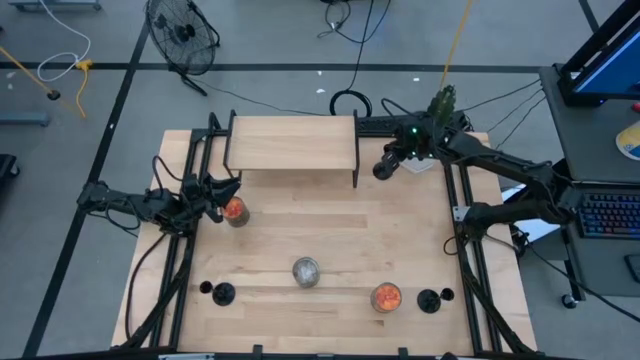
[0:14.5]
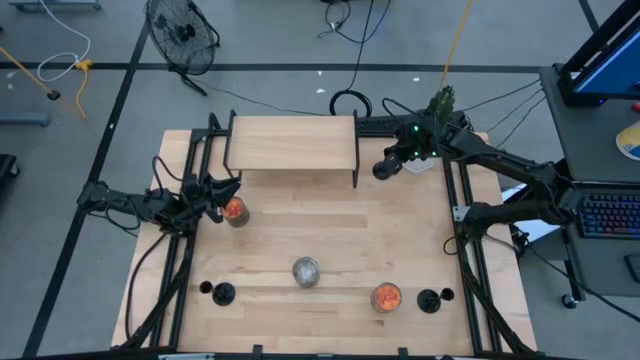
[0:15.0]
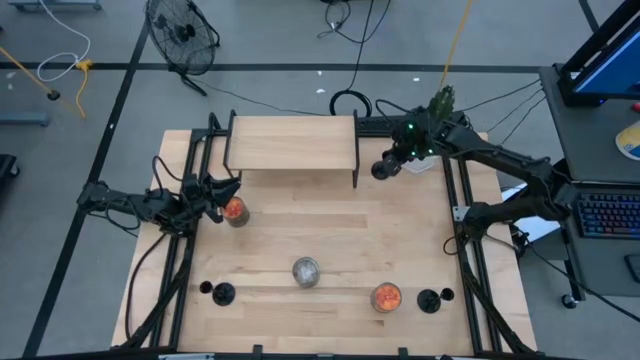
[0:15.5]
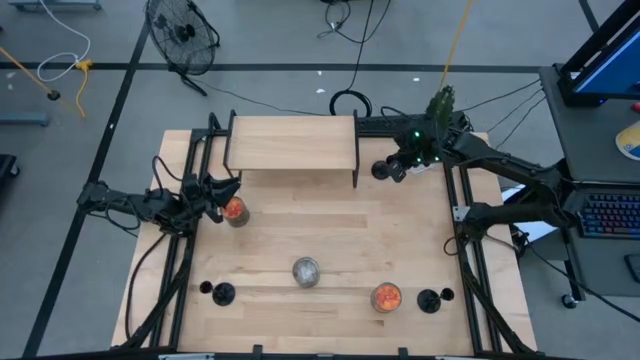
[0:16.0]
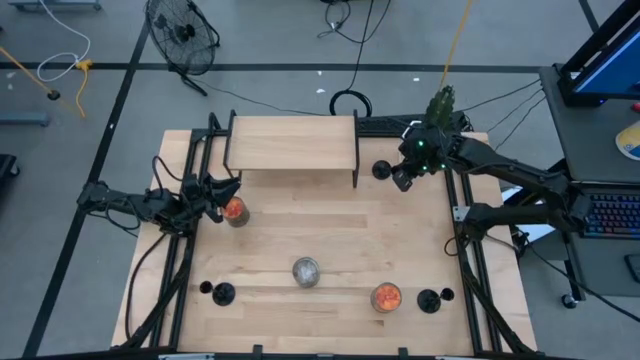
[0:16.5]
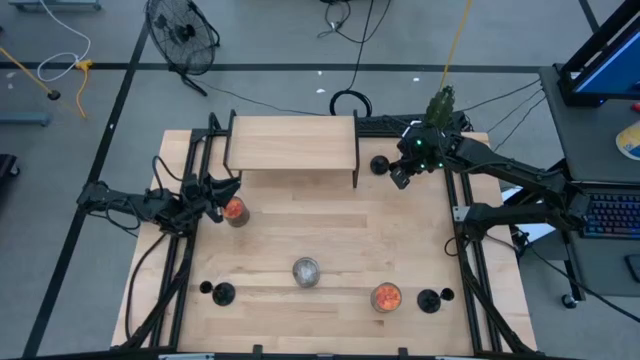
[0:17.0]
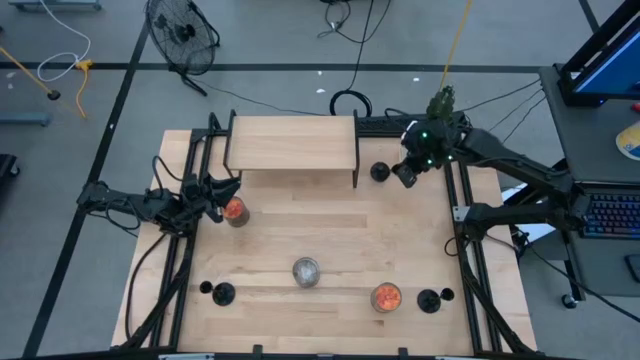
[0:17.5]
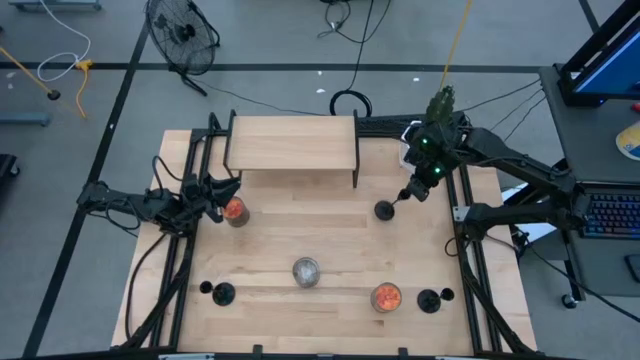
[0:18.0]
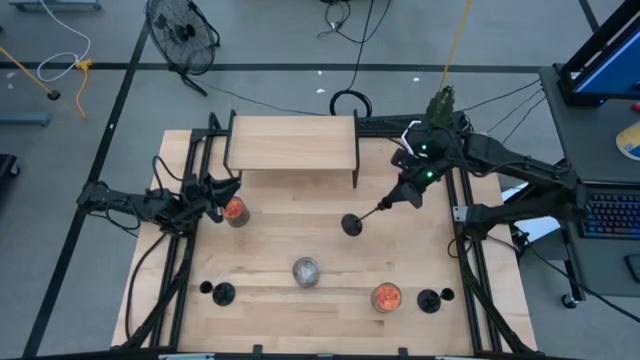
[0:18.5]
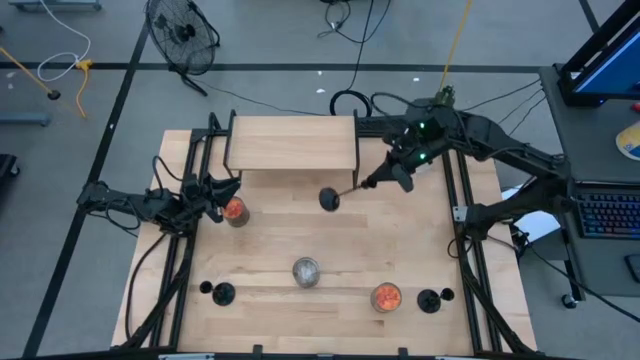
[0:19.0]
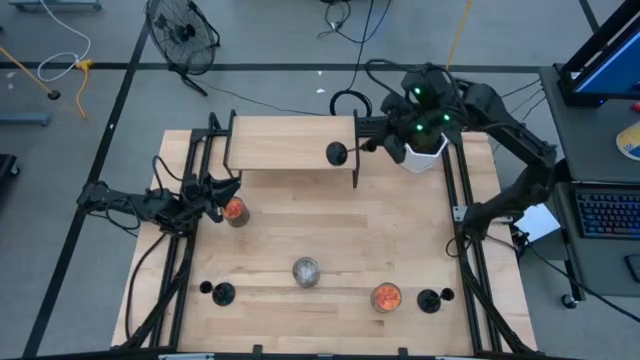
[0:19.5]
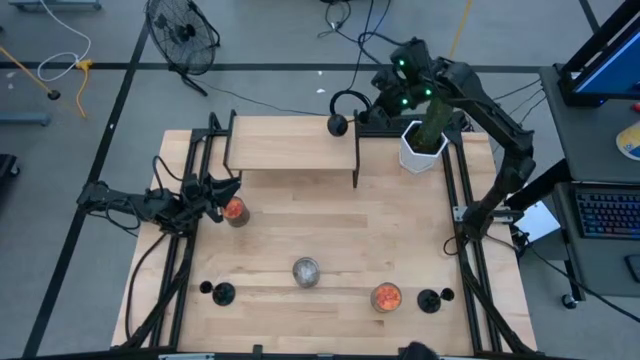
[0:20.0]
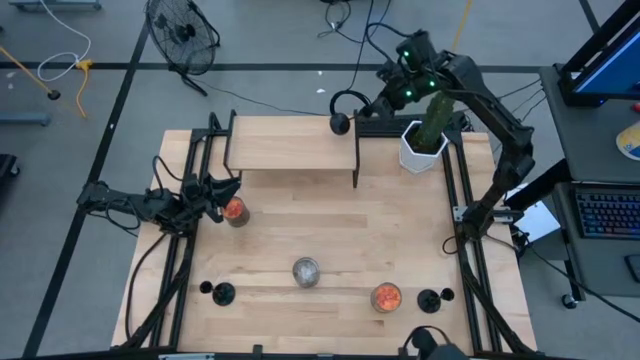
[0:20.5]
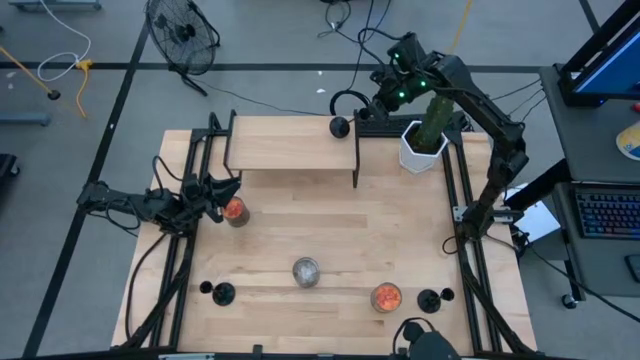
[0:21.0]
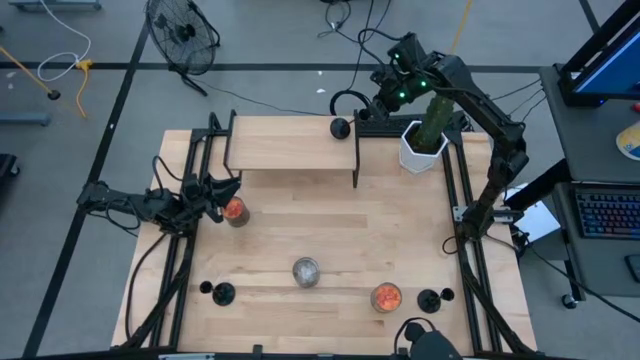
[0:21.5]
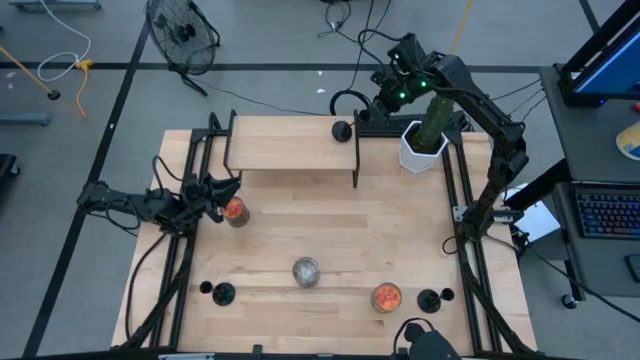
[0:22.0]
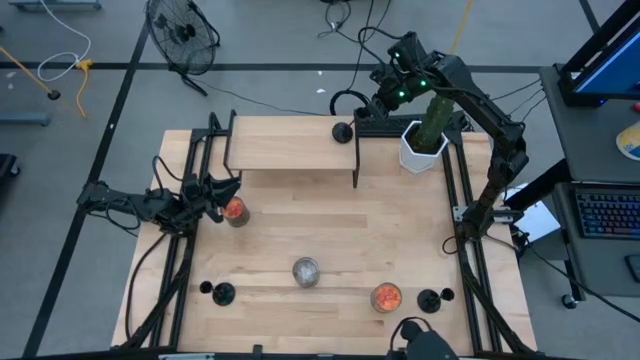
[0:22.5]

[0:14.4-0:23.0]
Task: Pick & Place candle stick holders
Put the top right black candle holder on the shelf

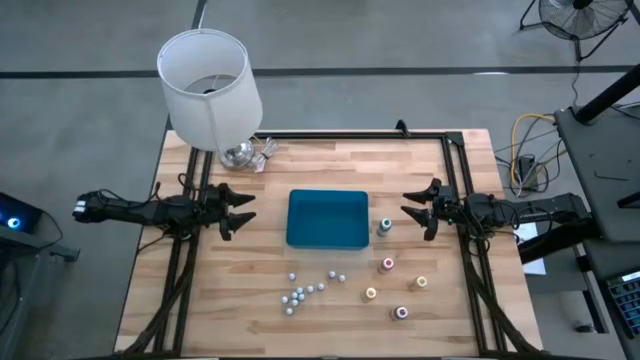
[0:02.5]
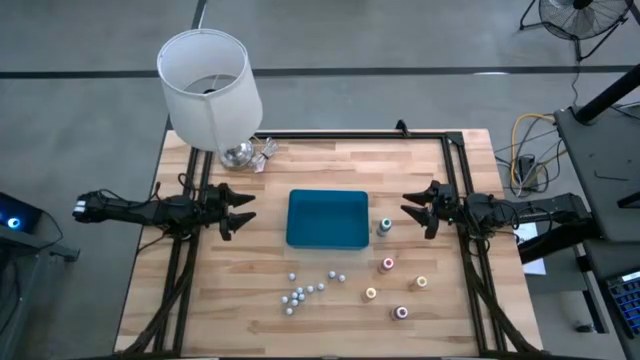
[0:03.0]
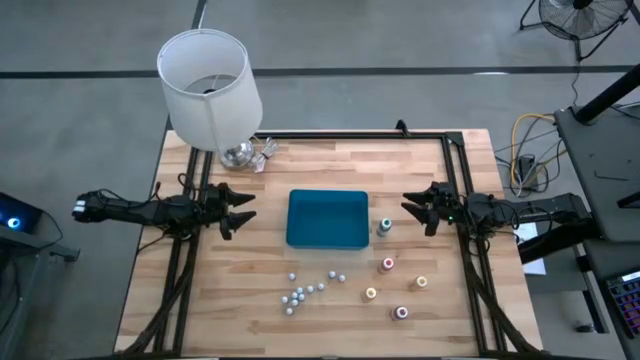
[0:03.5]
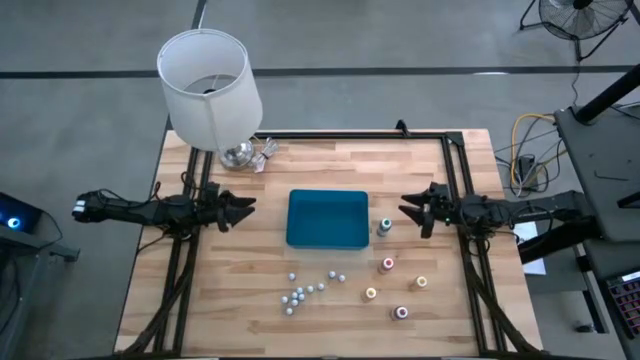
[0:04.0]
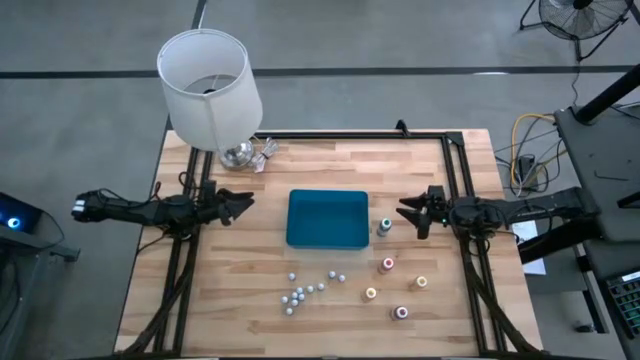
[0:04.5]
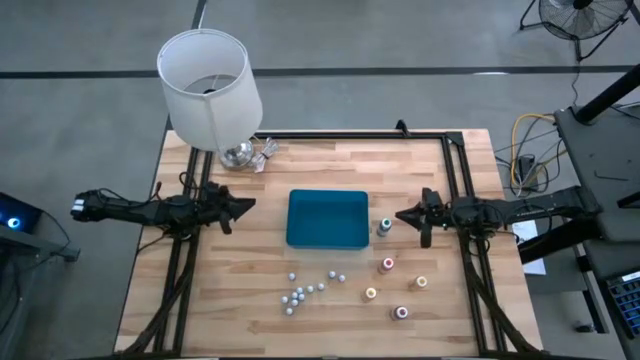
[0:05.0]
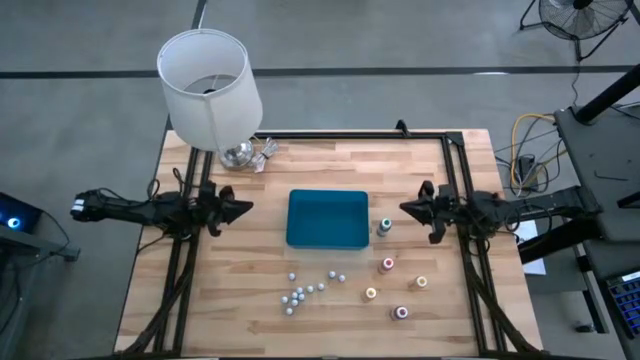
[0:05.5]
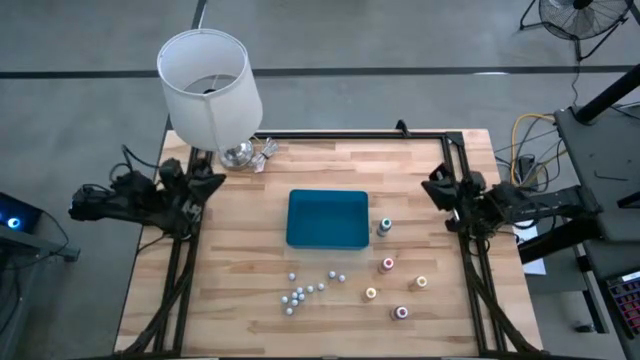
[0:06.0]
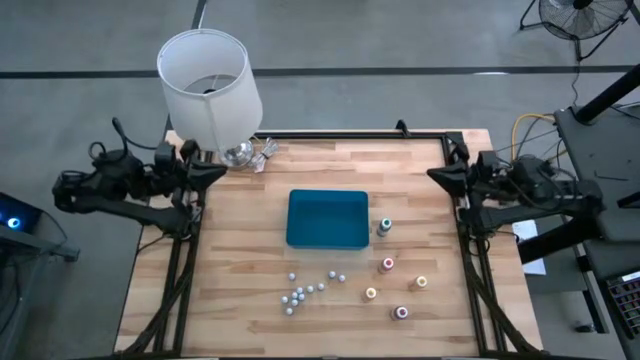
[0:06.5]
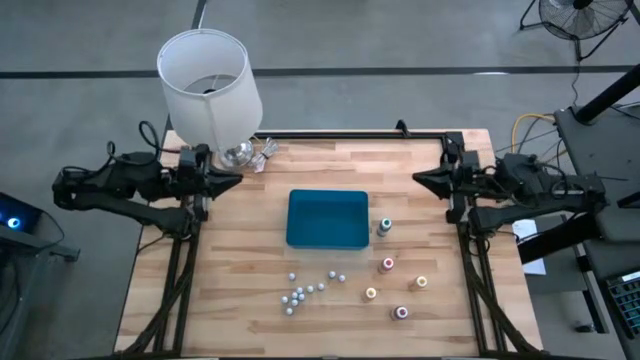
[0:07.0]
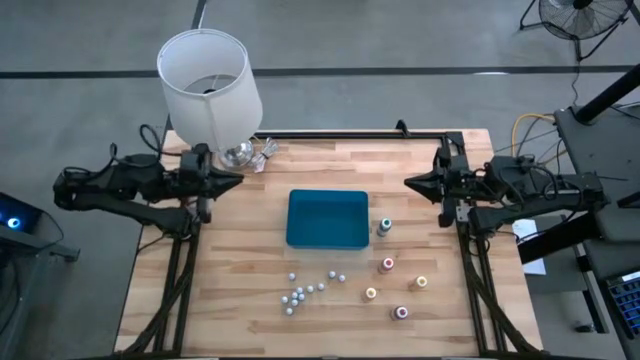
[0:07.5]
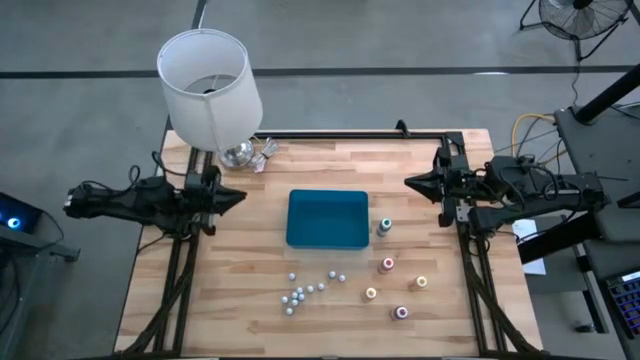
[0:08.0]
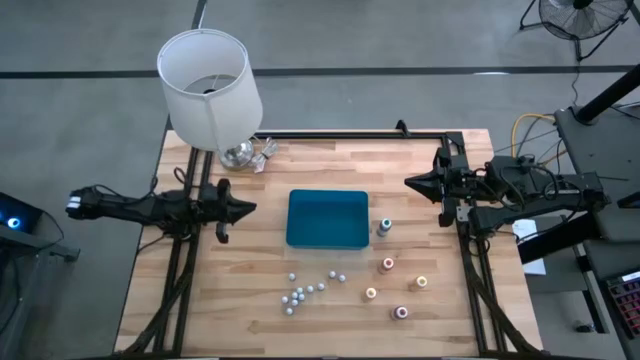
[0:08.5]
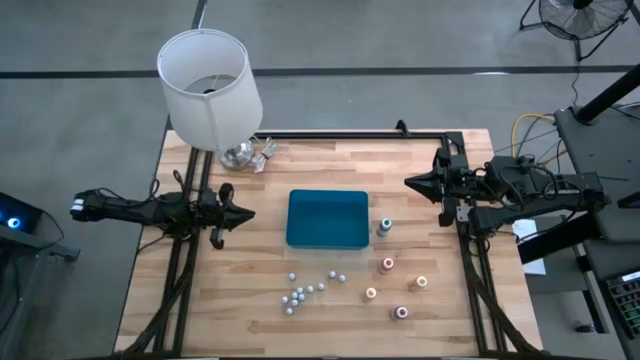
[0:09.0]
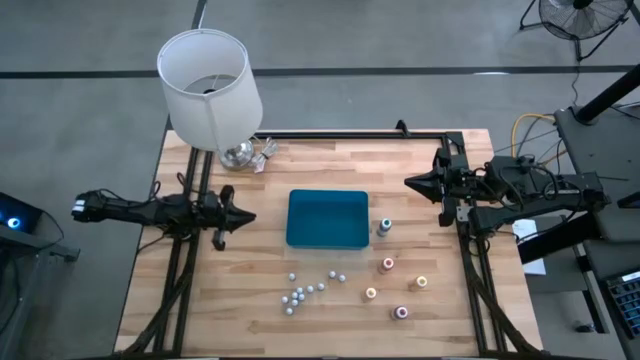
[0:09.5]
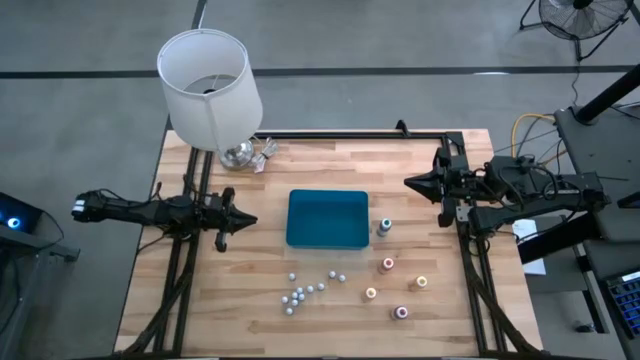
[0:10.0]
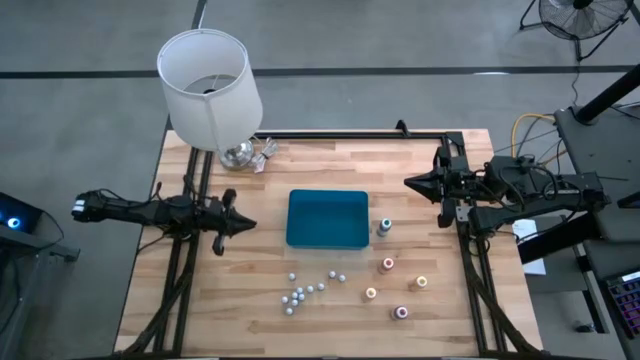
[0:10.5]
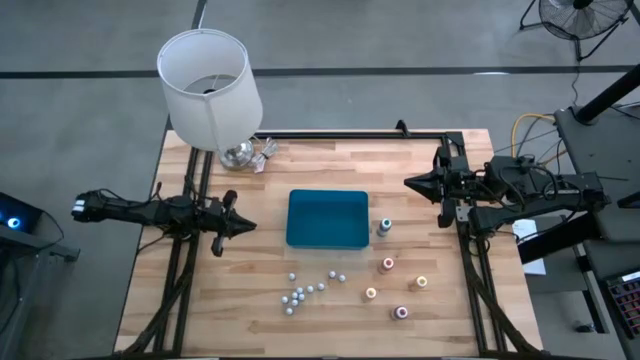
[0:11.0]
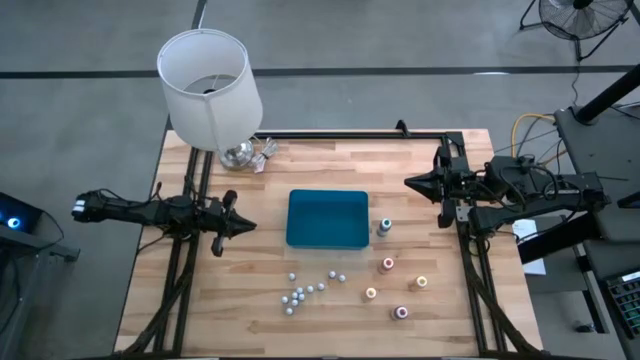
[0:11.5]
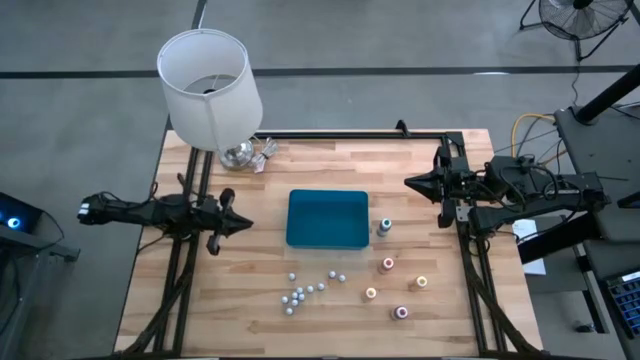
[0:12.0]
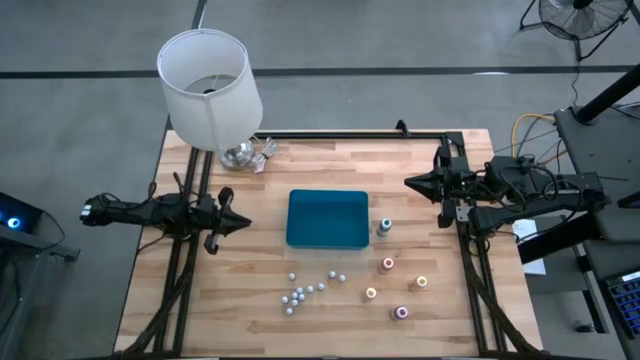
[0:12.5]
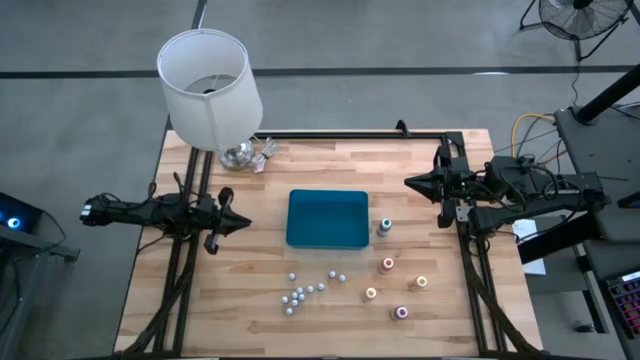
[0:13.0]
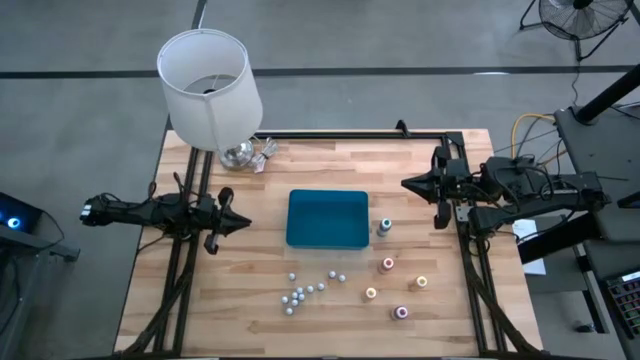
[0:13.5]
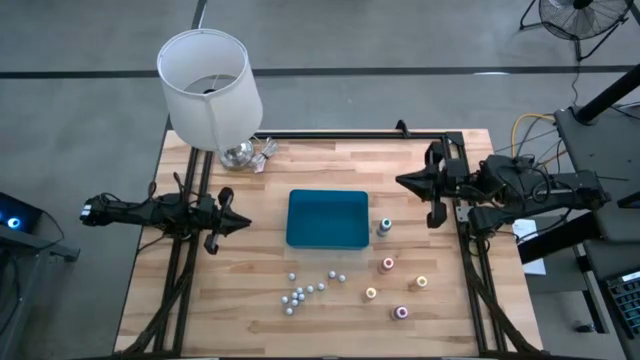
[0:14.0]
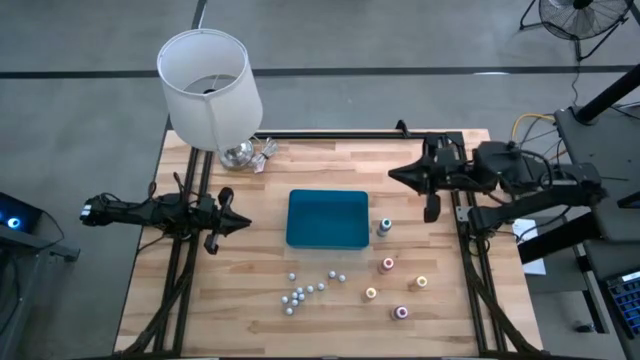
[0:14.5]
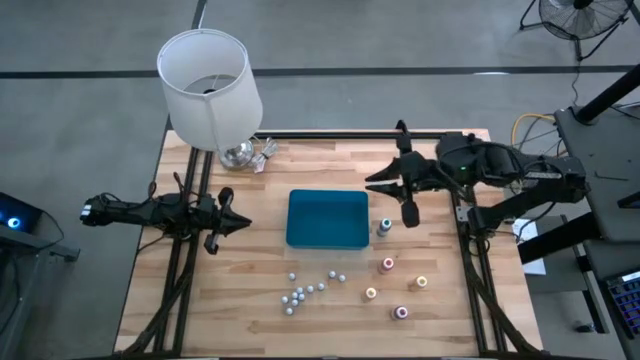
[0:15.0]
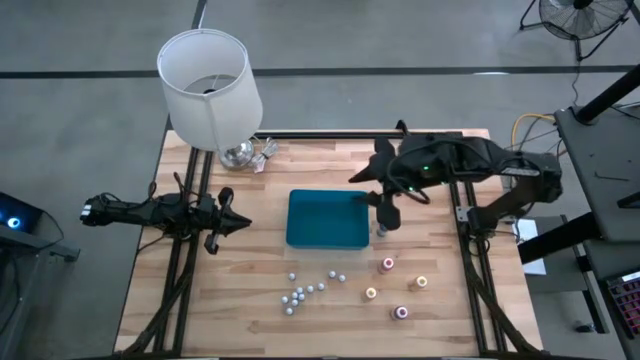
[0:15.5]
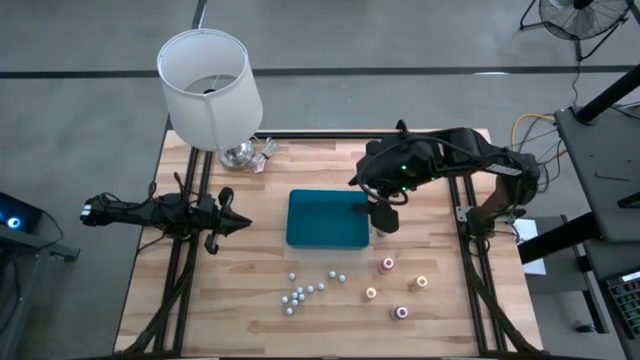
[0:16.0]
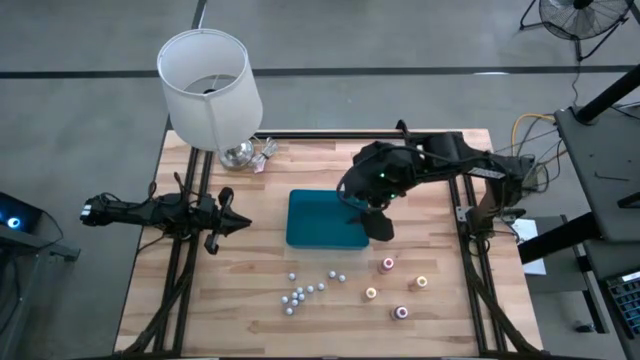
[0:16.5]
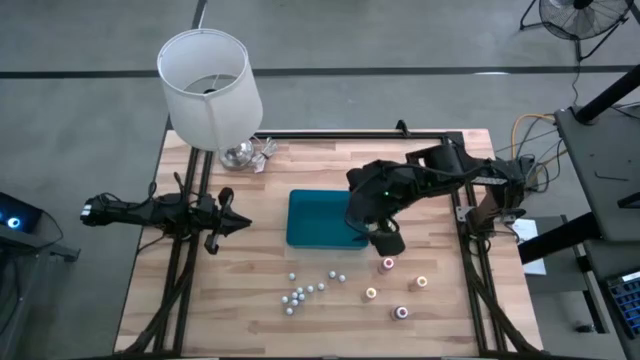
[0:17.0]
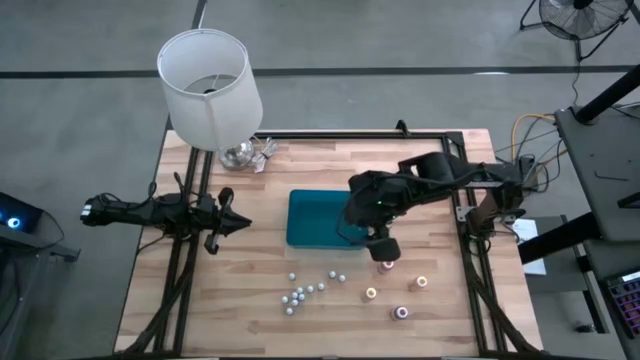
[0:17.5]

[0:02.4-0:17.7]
Task: Pick & Place food coloring
Put the right small red food coloring bottle into the blue bin
